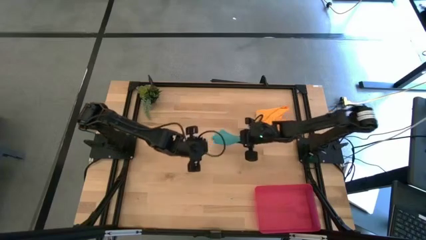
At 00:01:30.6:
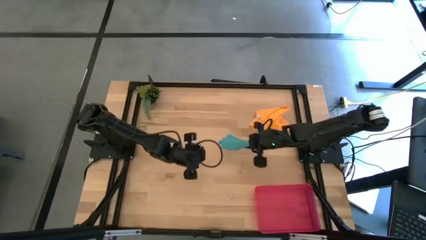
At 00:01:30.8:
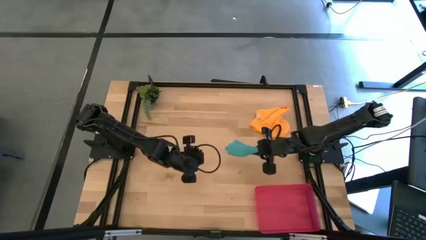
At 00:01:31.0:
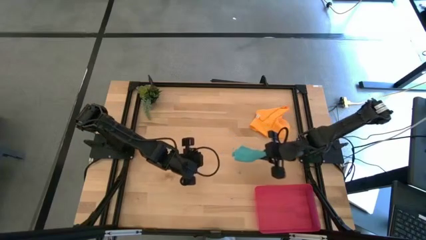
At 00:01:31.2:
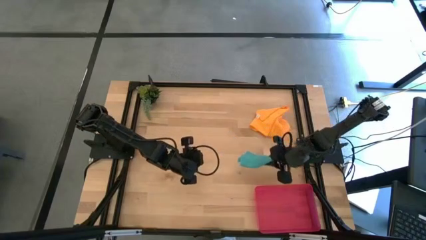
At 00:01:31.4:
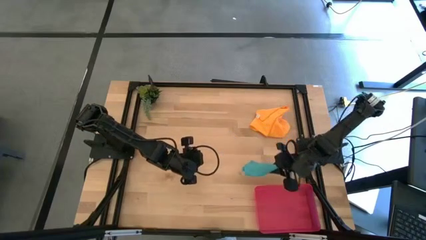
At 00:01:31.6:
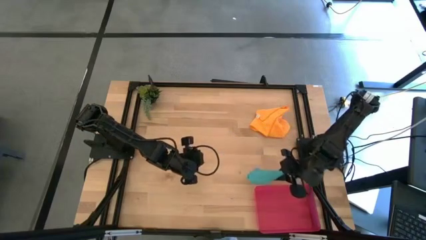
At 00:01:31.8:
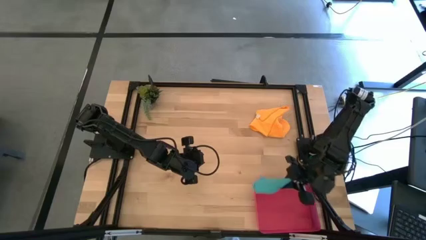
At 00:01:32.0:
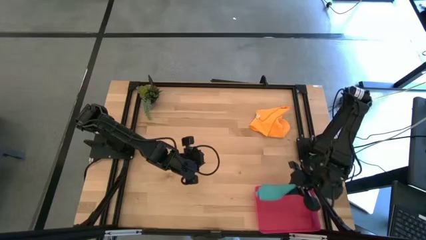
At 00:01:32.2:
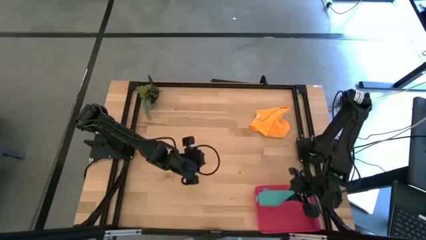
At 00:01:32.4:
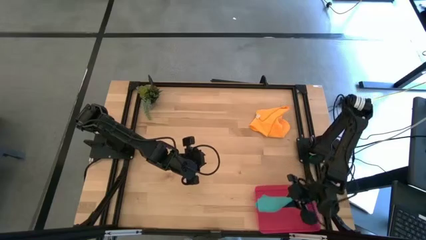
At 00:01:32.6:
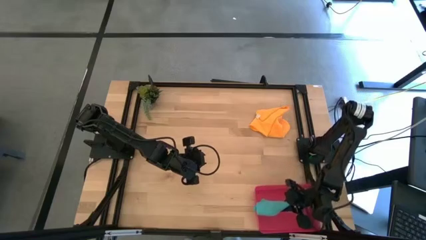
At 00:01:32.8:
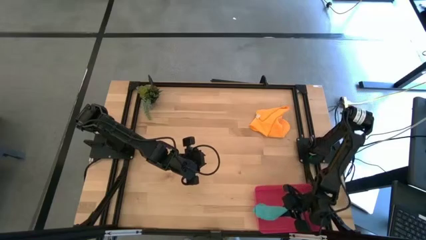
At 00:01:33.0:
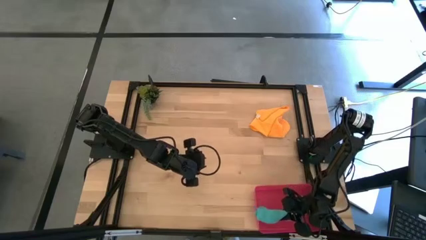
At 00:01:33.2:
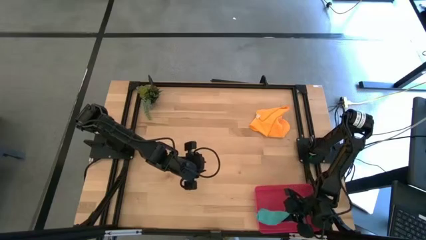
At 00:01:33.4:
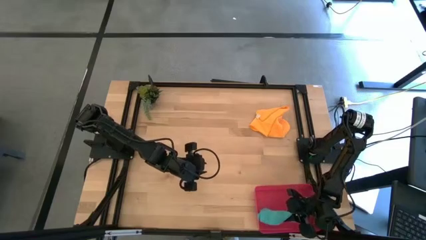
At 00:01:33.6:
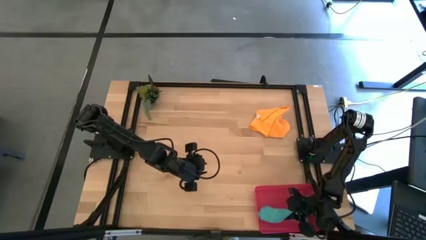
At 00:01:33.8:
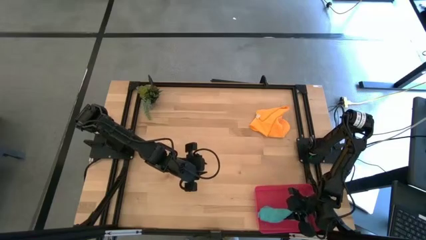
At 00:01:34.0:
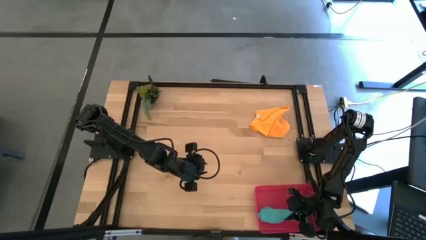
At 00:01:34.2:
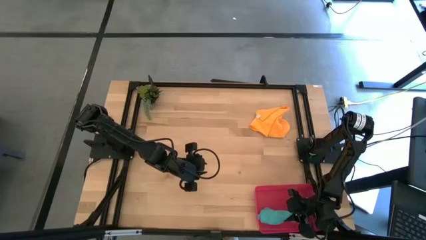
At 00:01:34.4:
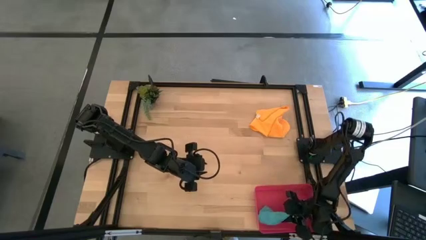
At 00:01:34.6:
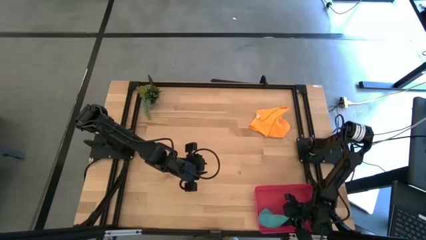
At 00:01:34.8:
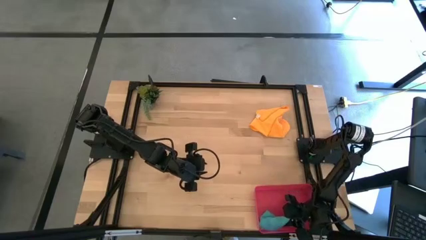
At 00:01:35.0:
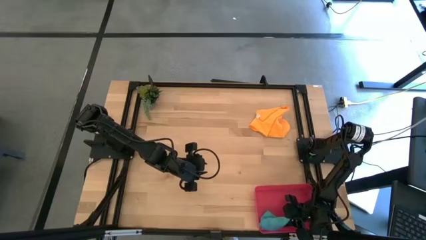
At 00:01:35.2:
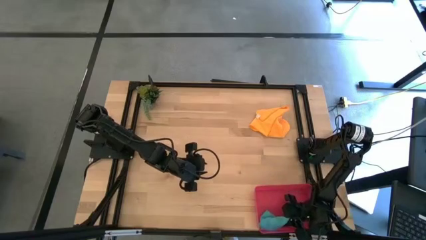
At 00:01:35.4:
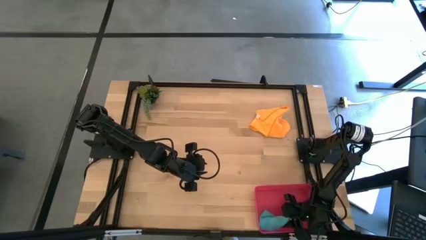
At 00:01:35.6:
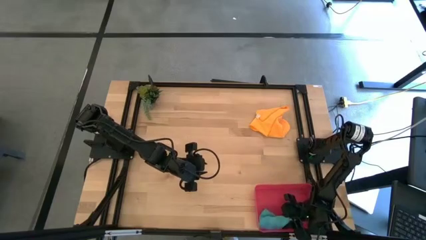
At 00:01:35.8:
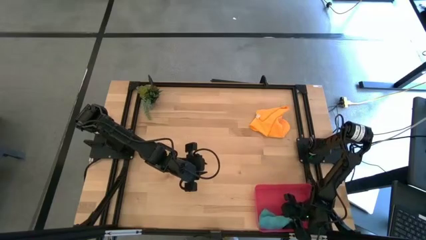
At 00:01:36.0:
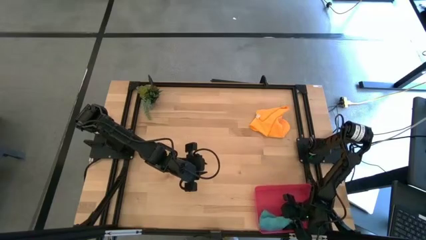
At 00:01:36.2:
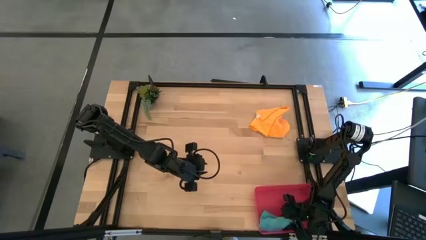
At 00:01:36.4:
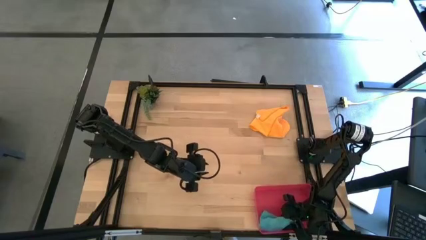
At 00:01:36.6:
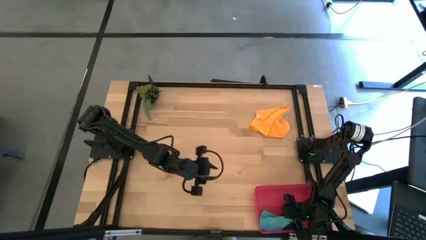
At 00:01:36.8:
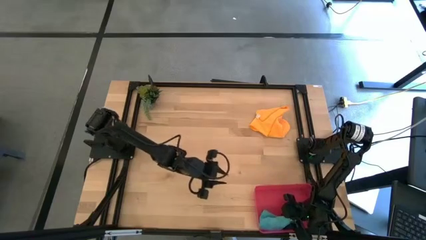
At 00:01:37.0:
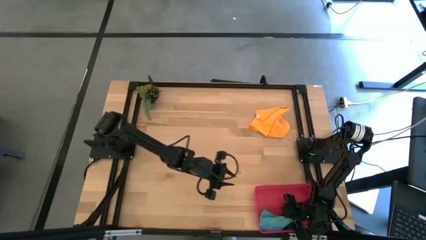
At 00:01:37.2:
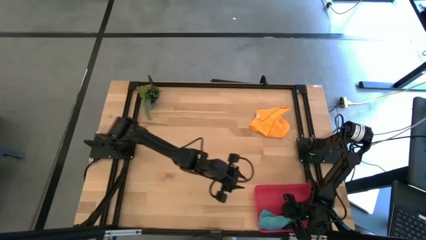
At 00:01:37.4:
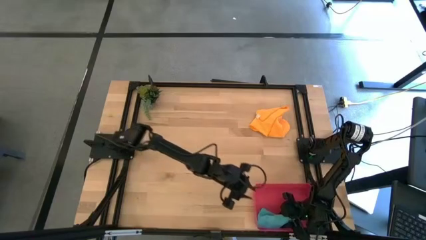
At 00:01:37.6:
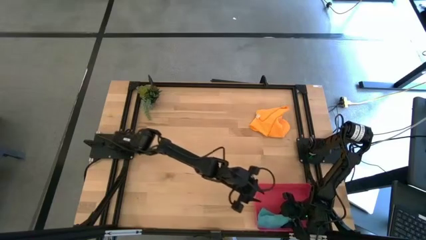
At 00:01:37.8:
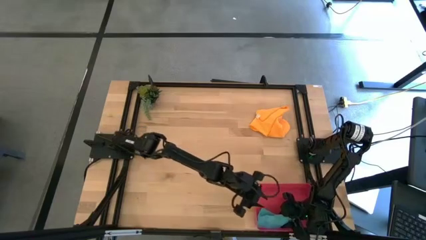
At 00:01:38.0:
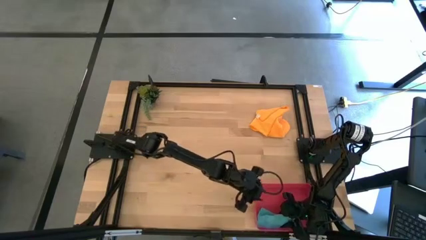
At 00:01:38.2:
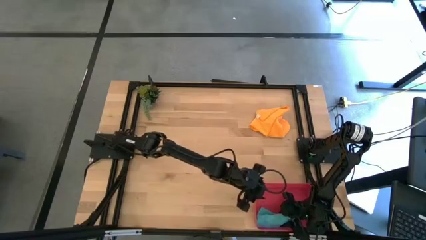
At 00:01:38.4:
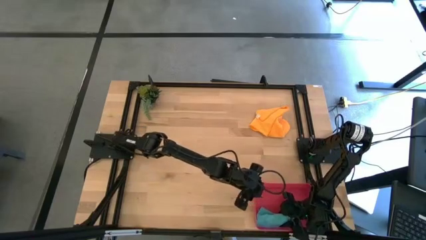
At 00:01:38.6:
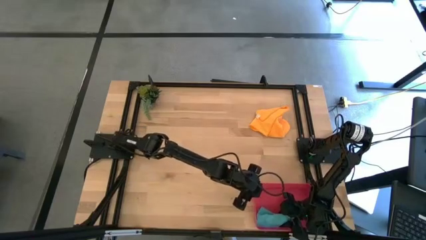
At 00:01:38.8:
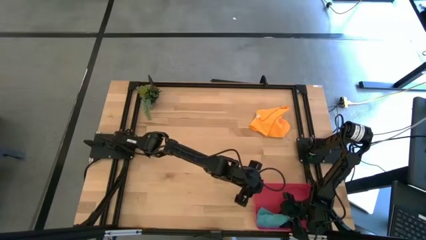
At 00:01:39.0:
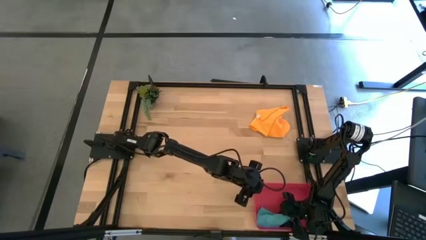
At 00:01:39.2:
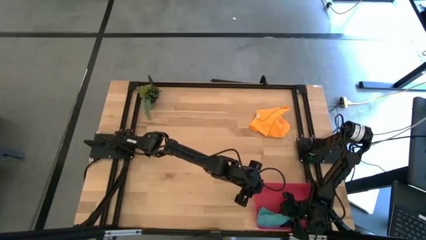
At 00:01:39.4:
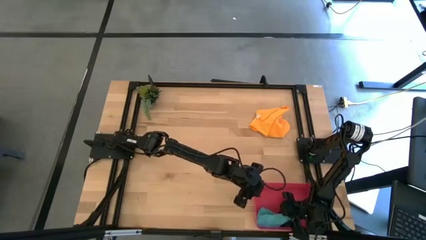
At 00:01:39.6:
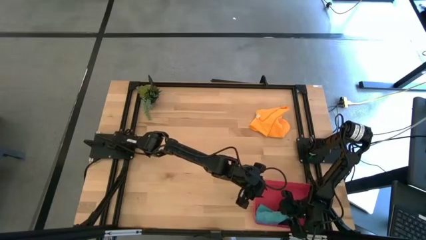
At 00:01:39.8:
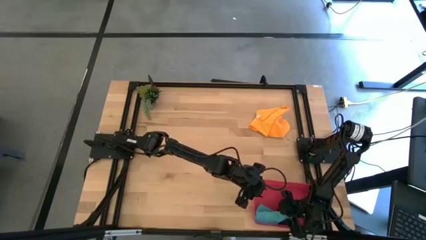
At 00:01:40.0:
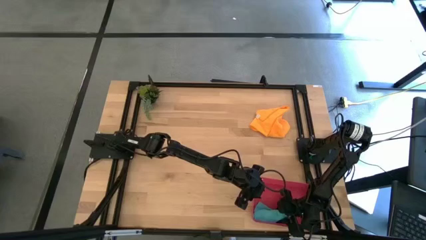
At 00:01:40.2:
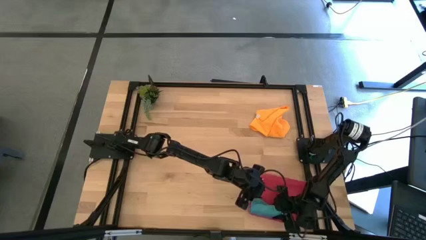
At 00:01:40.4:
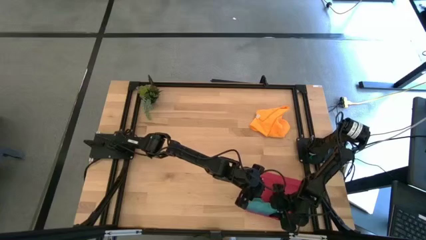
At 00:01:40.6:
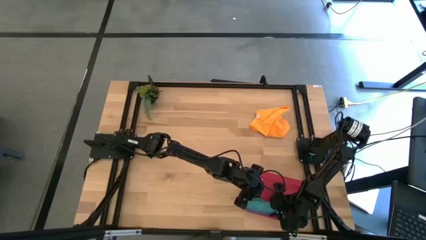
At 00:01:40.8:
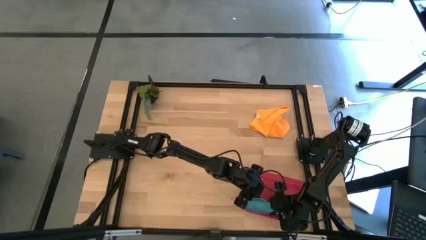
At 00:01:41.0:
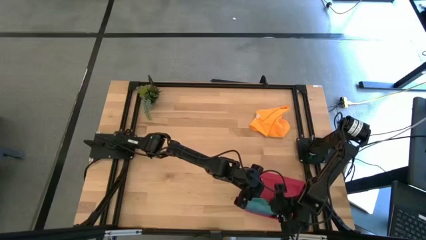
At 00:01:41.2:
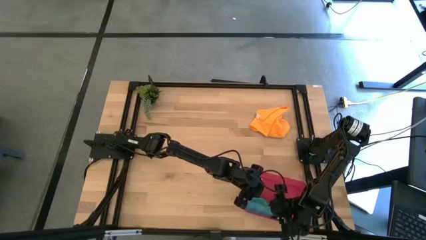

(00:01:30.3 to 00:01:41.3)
Task: Roll microfiber towels into tight, uniform cylinder then place into a basket
Put the blue microfiber cloth into the red bin
